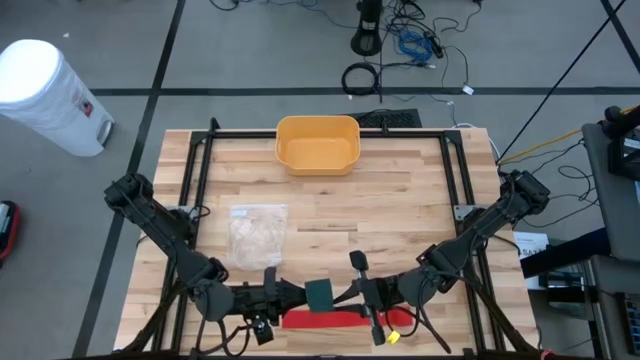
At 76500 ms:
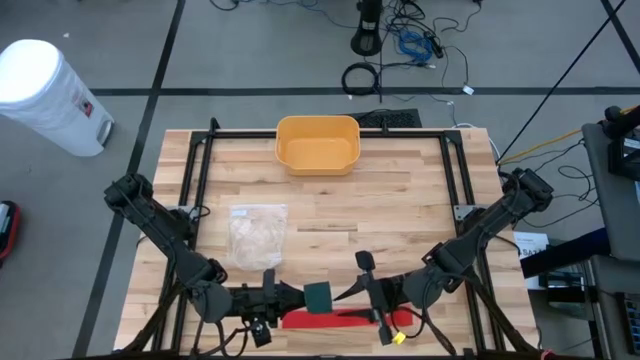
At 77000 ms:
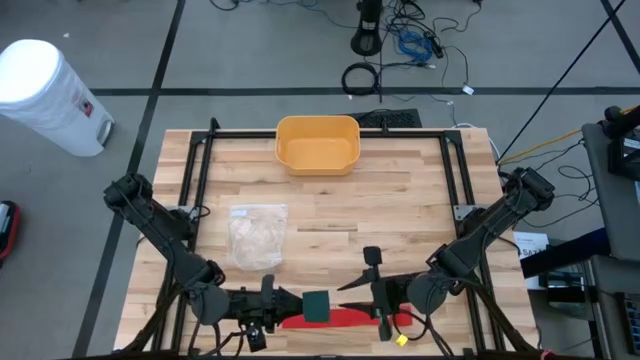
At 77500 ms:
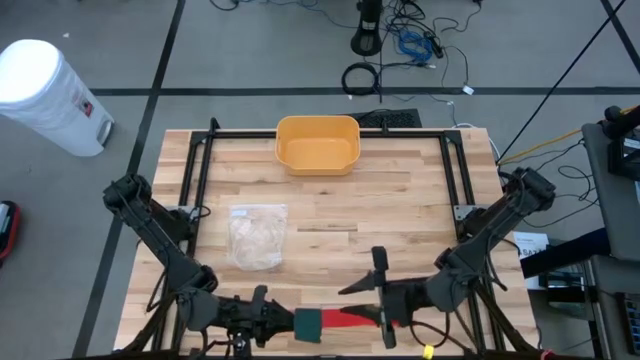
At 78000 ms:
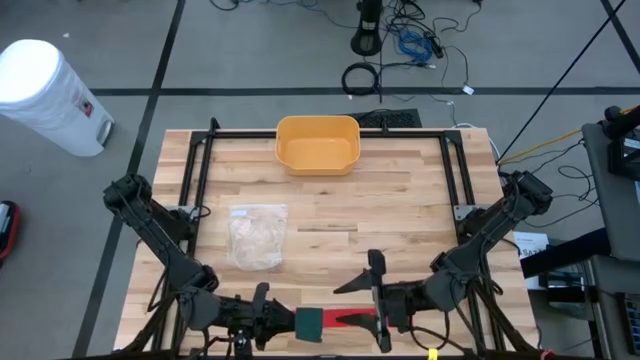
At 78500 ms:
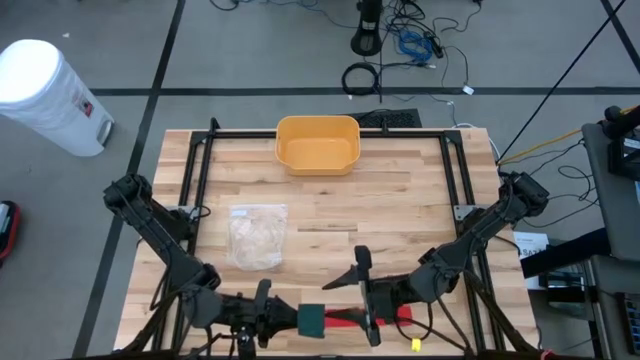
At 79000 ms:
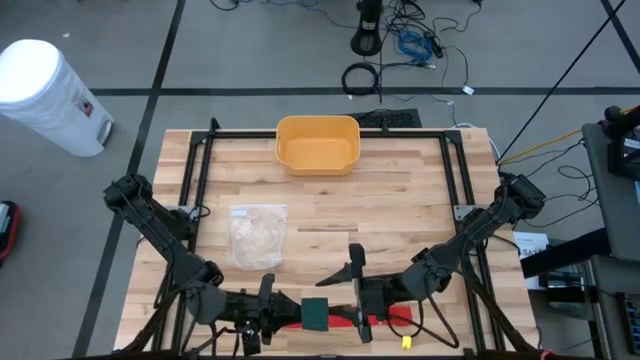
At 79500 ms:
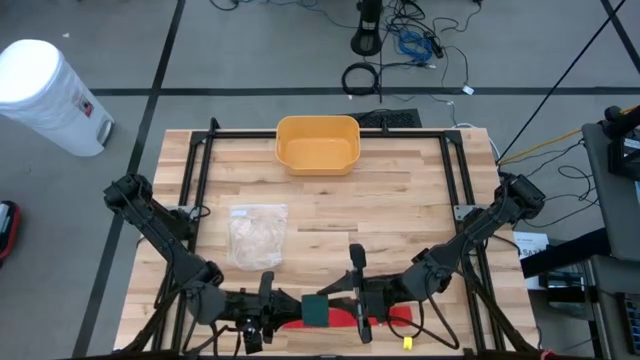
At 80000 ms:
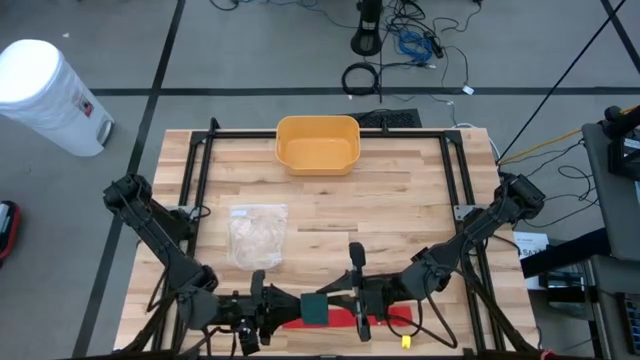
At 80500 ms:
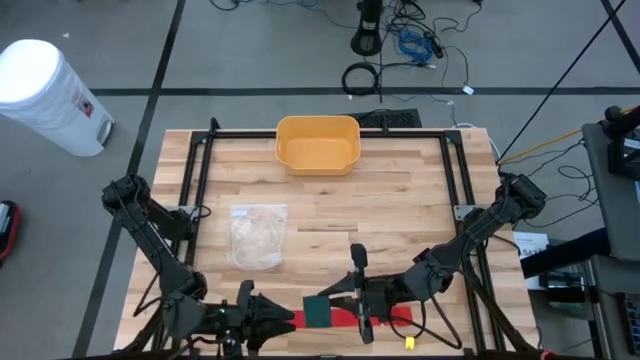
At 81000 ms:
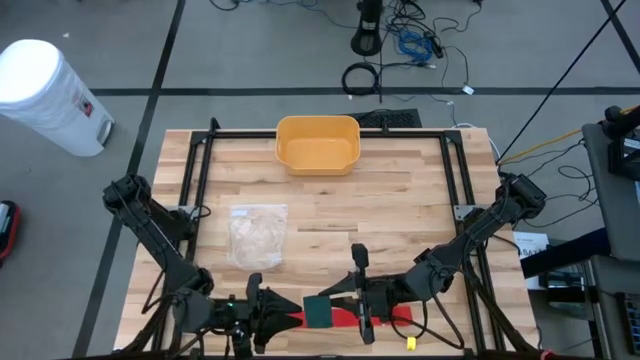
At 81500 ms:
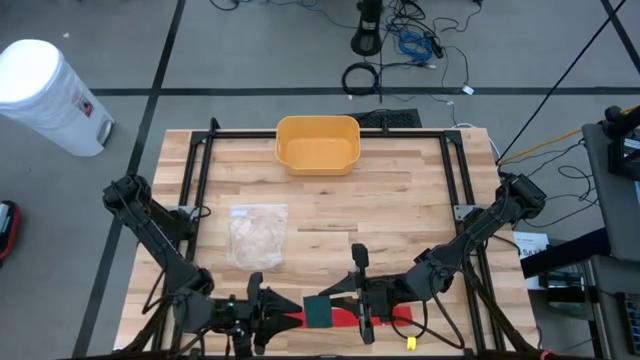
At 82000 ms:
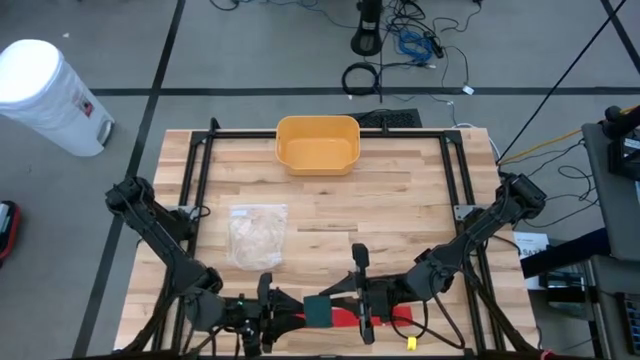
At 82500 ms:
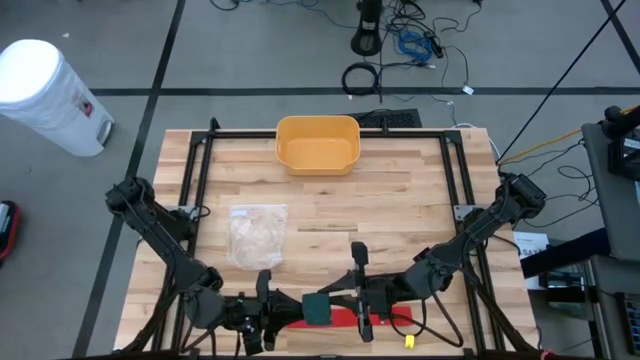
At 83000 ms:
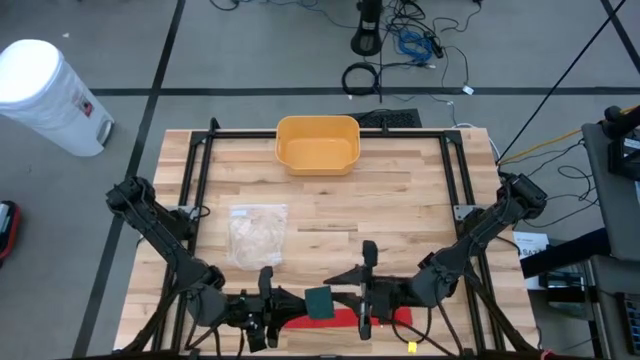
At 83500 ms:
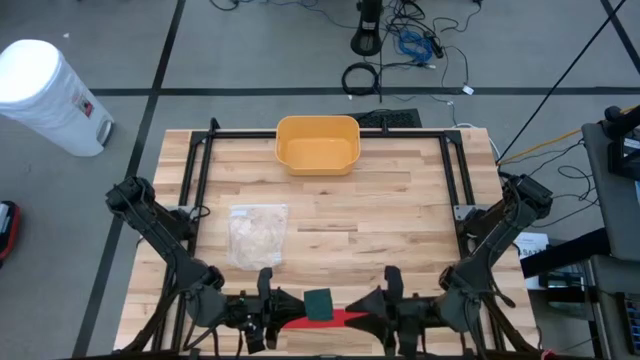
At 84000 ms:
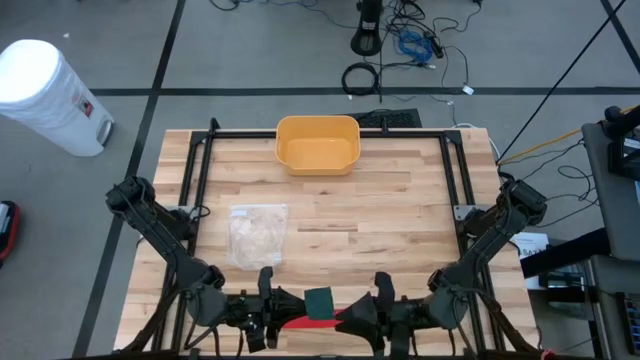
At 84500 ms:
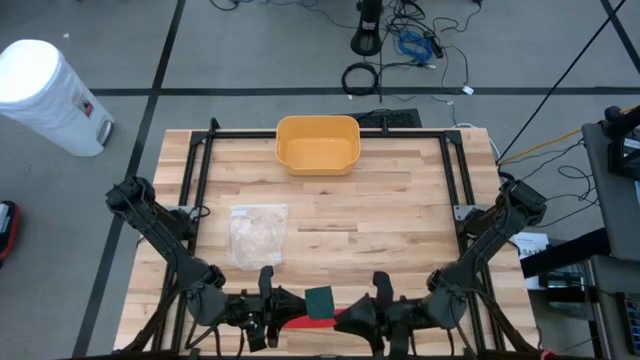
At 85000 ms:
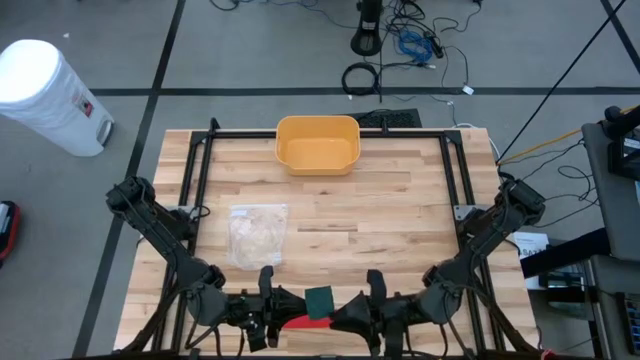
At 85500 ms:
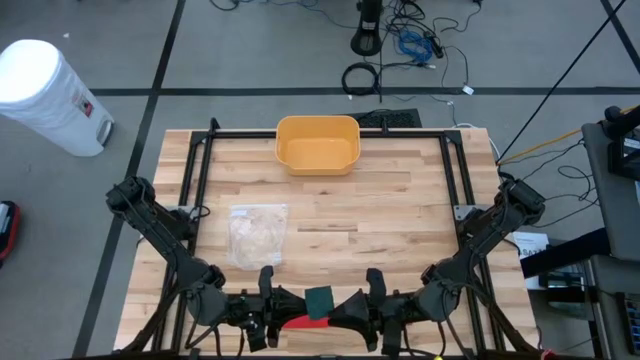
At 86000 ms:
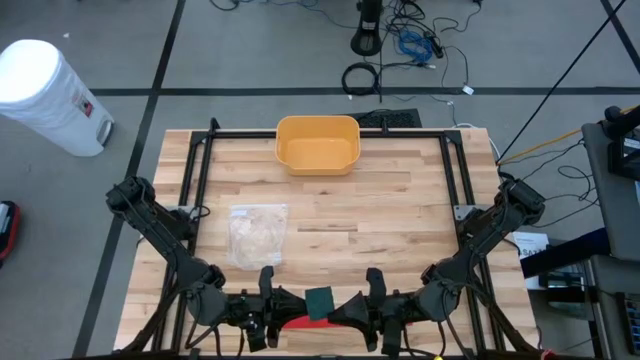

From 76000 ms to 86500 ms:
Task: Roll bandage
Roll the green bandage

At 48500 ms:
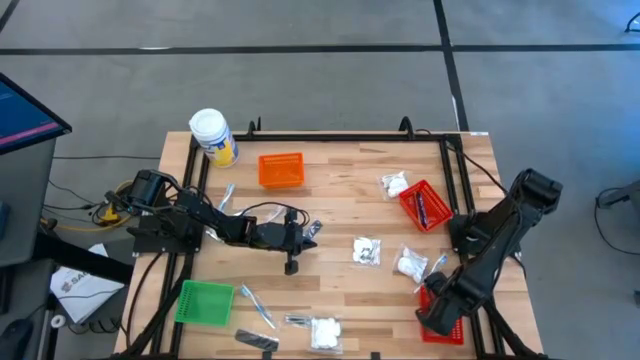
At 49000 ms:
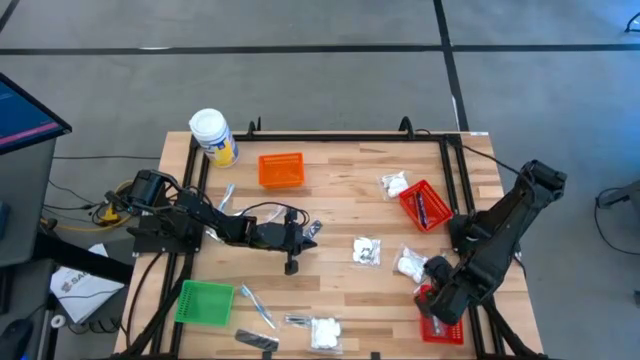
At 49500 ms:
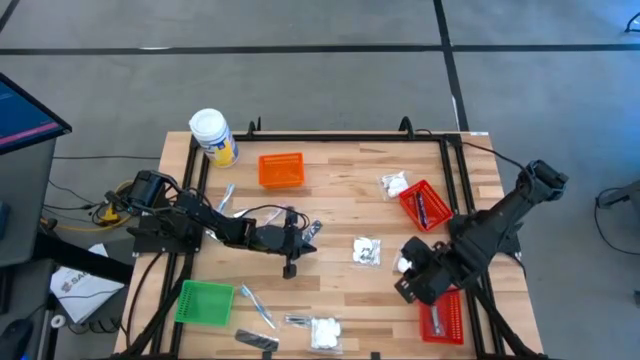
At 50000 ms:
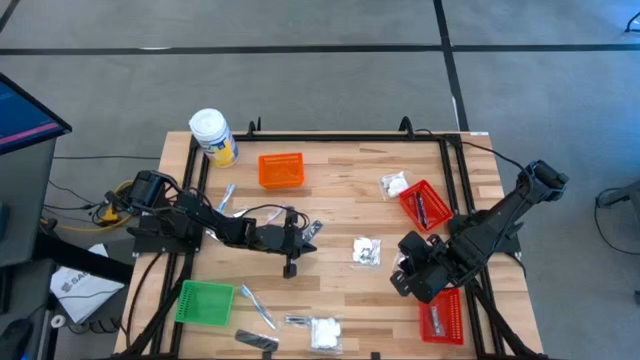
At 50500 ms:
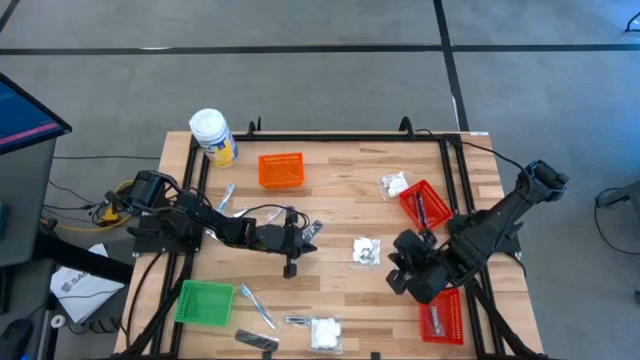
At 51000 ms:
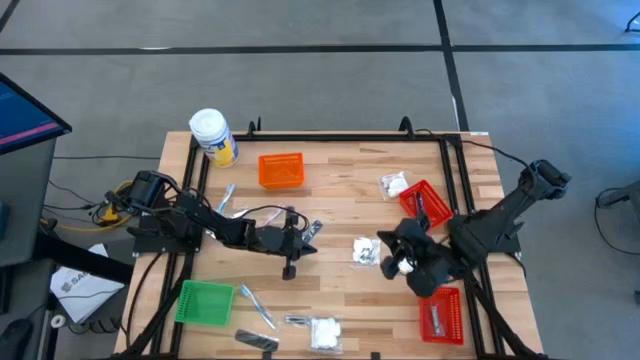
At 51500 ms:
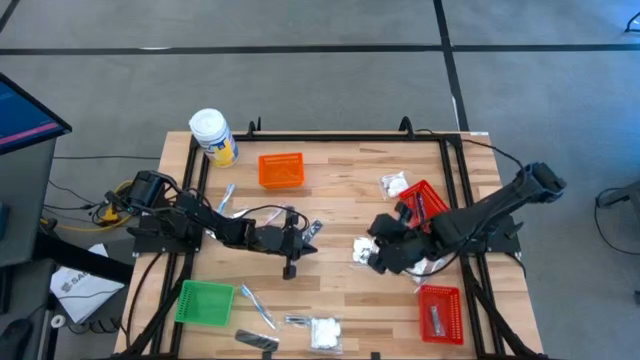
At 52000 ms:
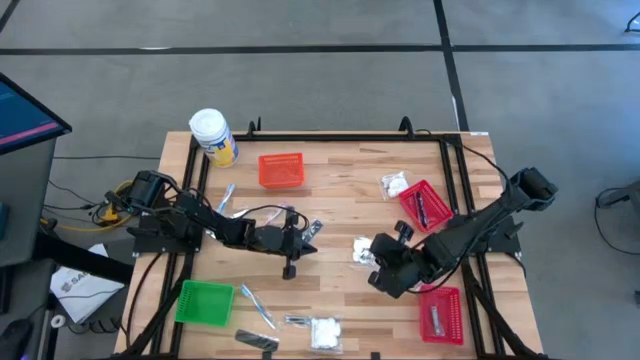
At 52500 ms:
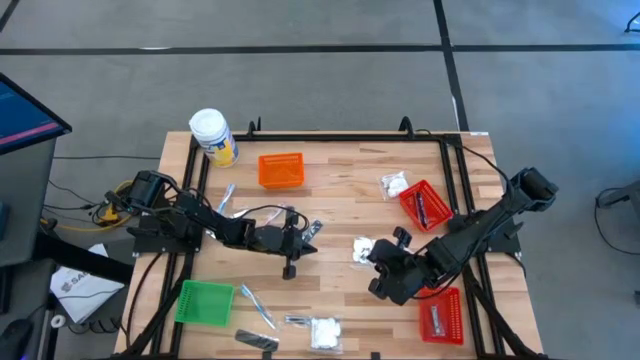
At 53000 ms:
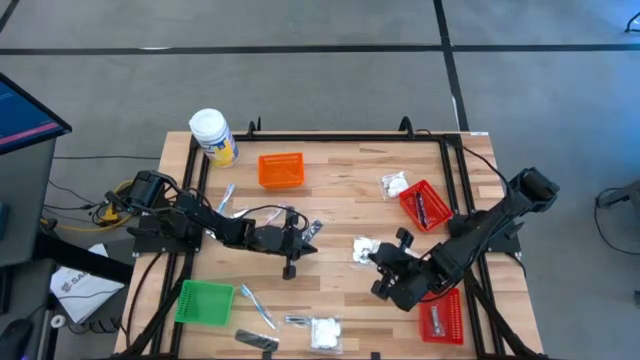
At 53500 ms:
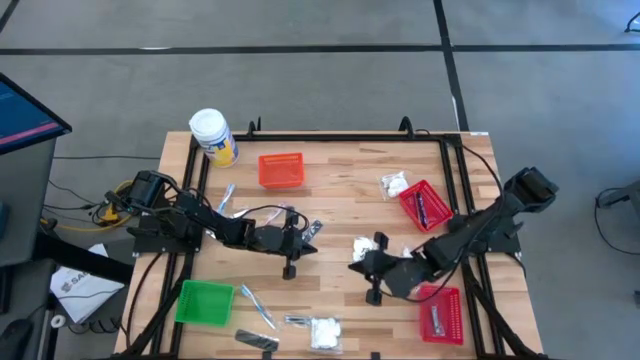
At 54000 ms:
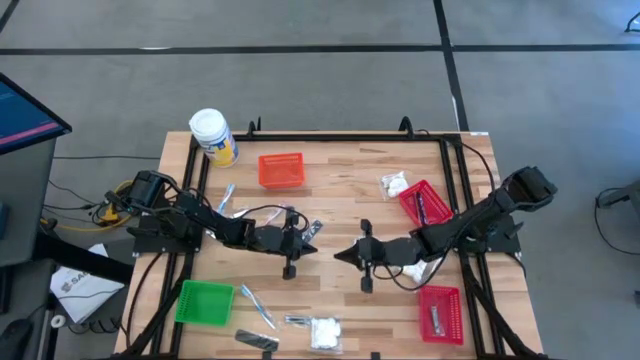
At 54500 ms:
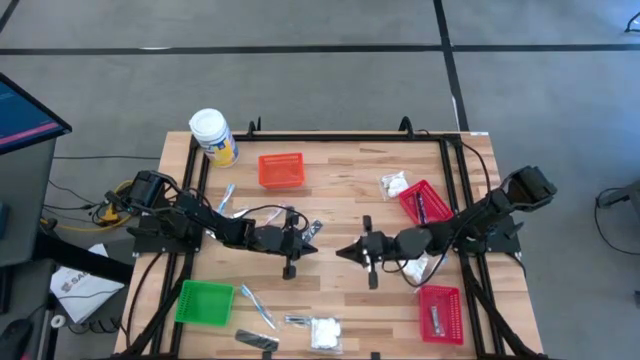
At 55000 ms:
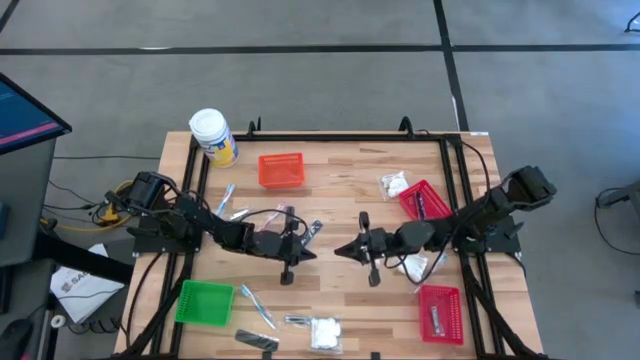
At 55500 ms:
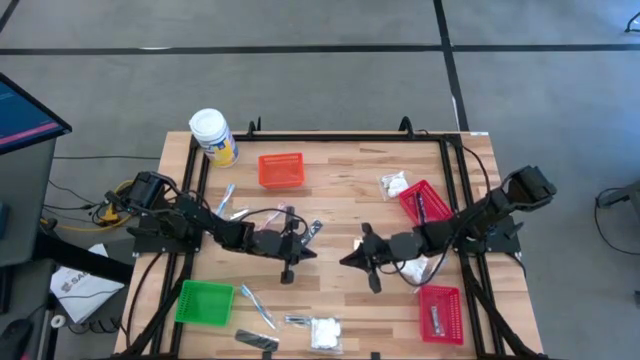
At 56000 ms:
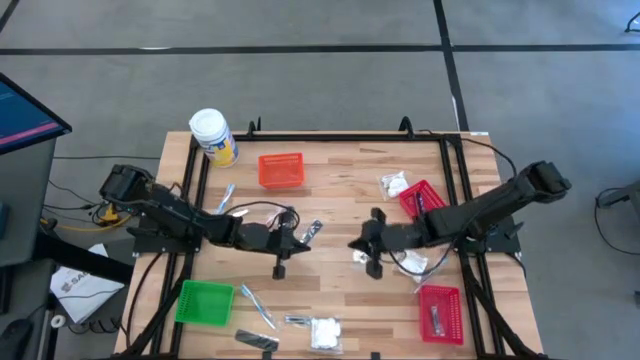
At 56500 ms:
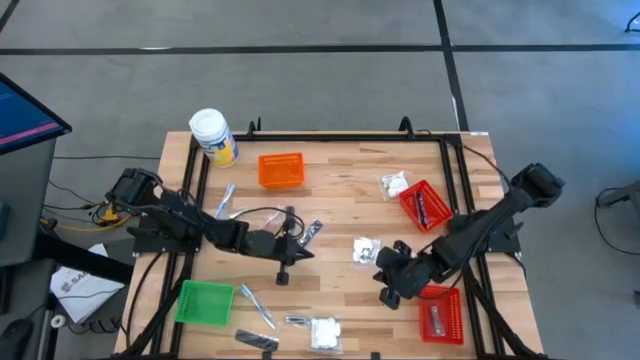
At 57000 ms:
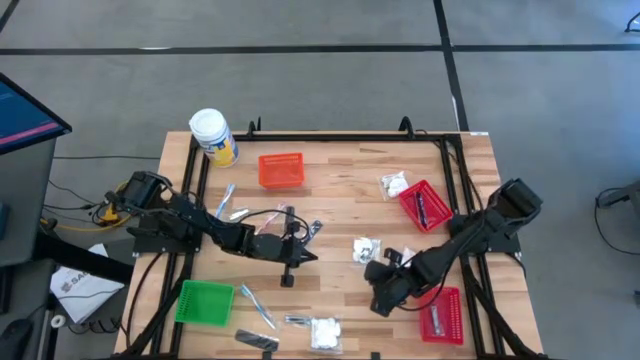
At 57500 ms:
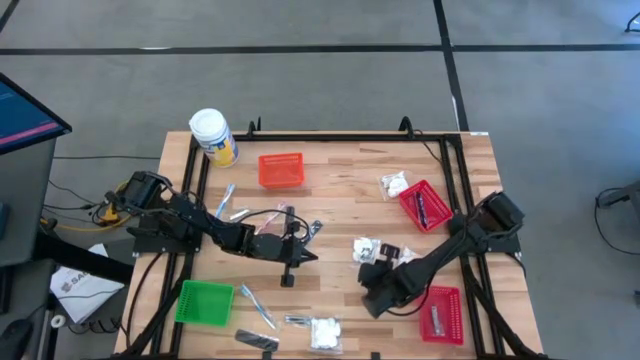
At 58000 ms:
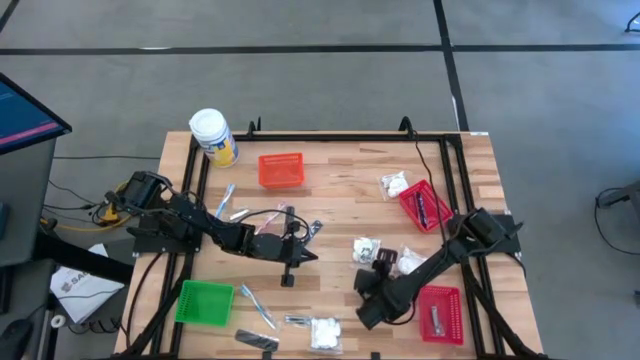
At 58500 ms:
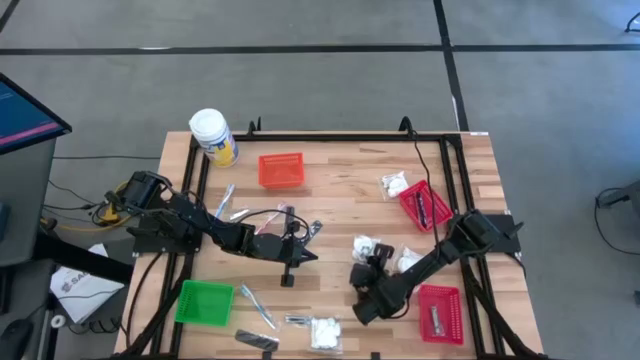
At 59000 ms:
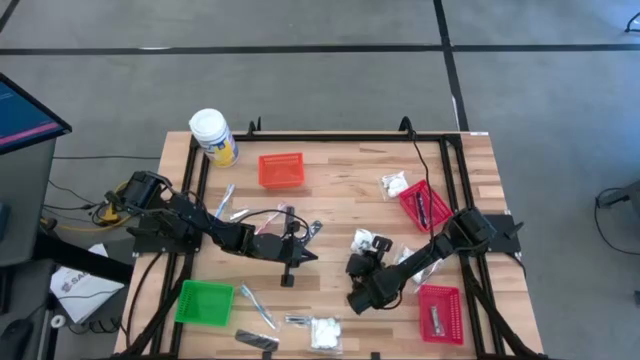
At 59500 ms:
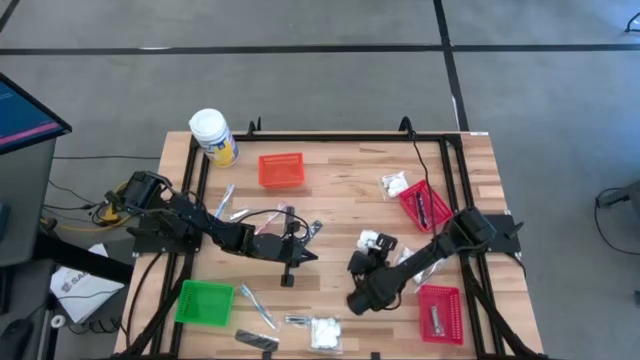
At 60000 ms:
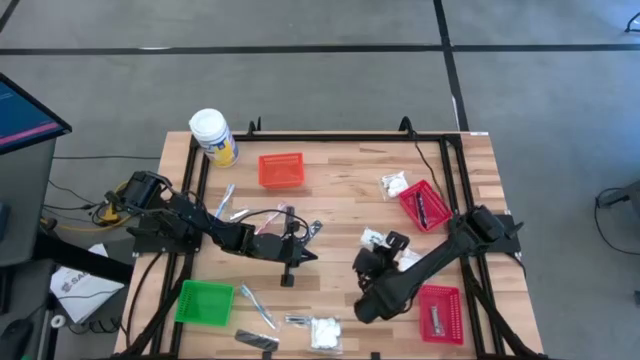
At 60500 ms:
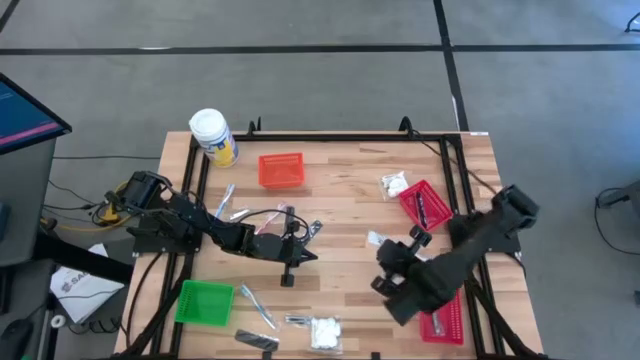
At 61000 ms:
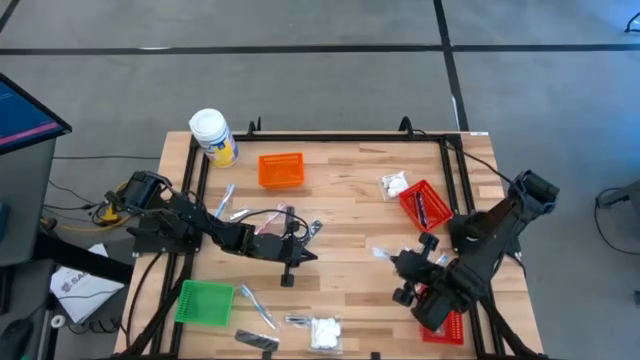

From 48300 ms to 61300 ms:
Task: Pick & Place Travel size toiletries
Put the white cotton pack into the orange basket
